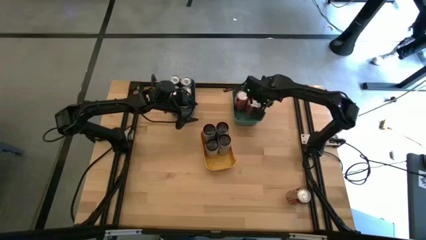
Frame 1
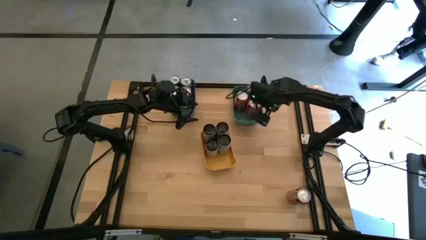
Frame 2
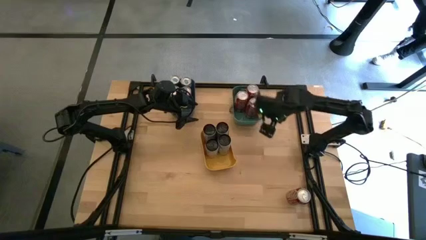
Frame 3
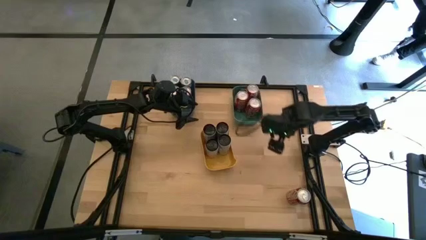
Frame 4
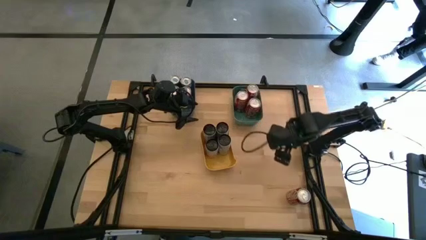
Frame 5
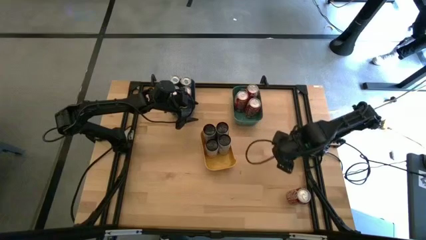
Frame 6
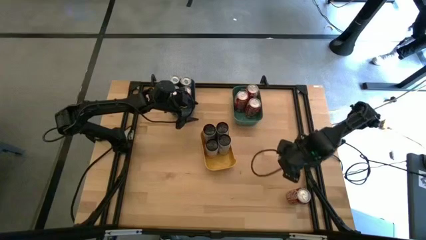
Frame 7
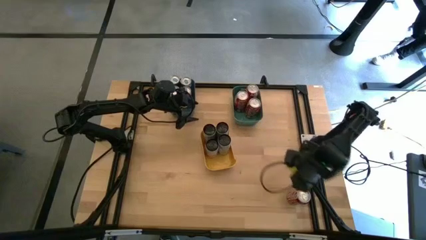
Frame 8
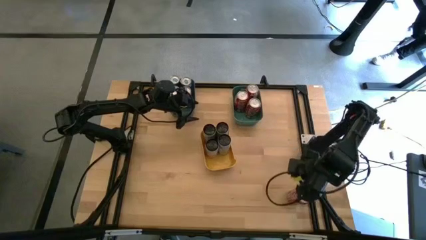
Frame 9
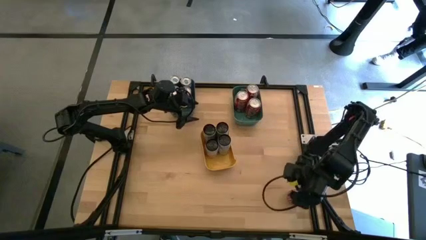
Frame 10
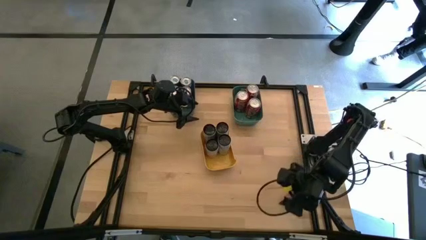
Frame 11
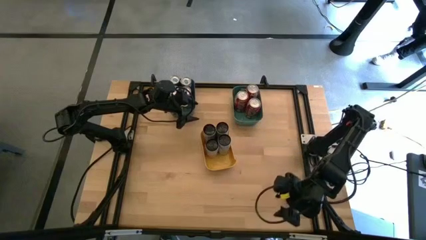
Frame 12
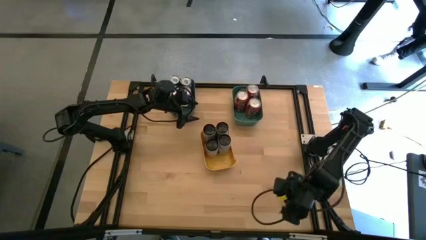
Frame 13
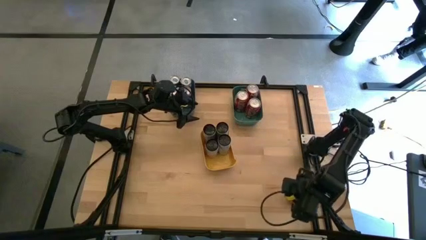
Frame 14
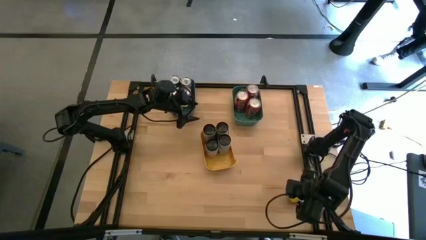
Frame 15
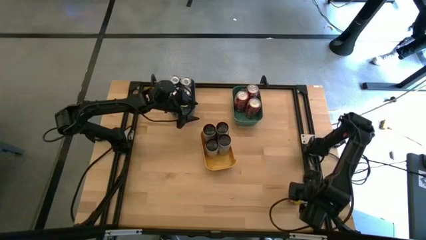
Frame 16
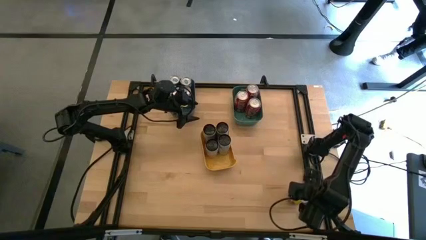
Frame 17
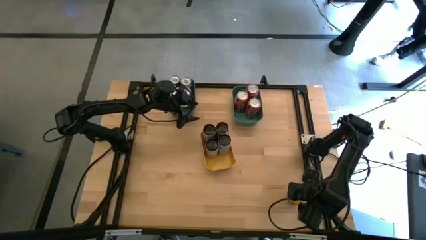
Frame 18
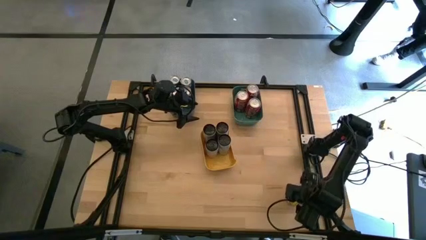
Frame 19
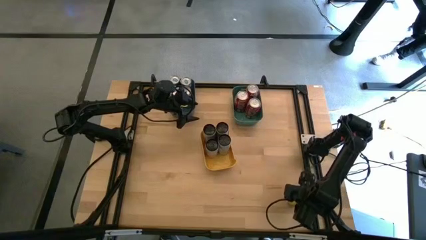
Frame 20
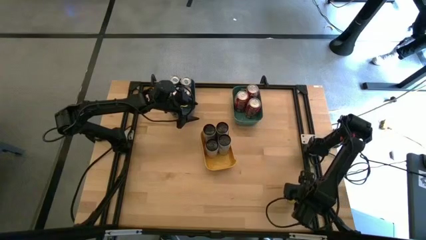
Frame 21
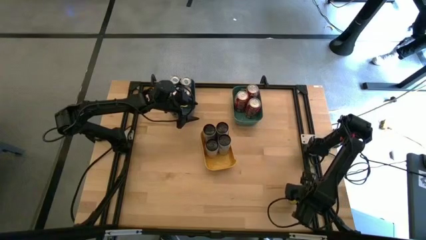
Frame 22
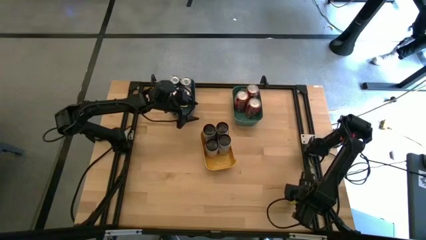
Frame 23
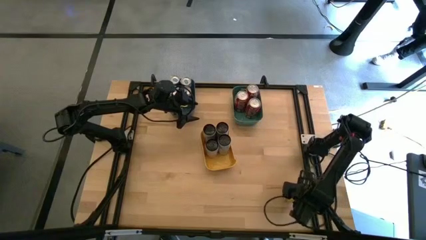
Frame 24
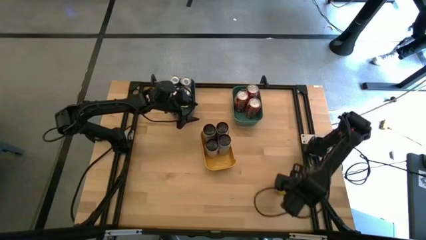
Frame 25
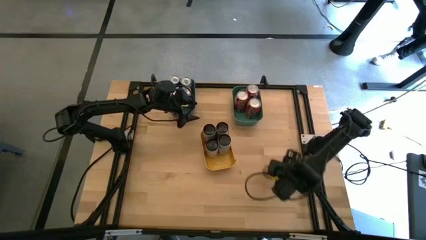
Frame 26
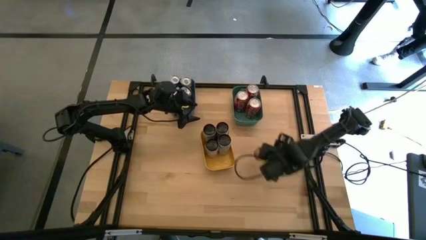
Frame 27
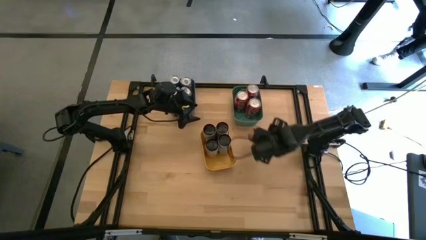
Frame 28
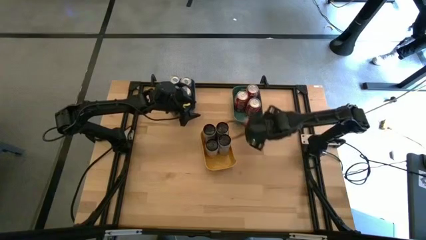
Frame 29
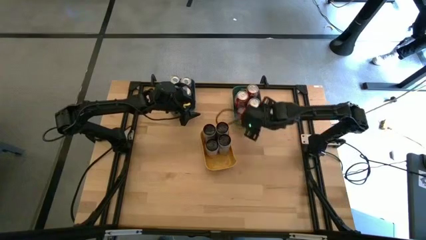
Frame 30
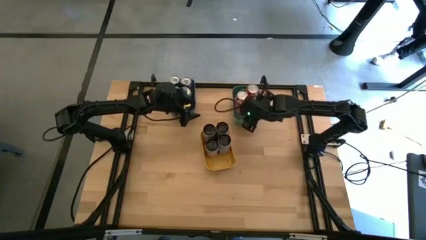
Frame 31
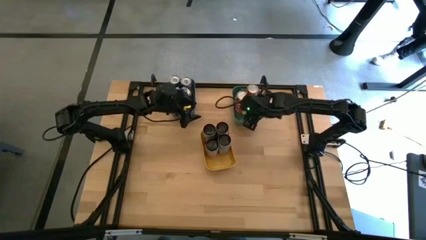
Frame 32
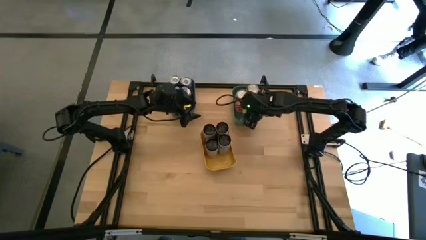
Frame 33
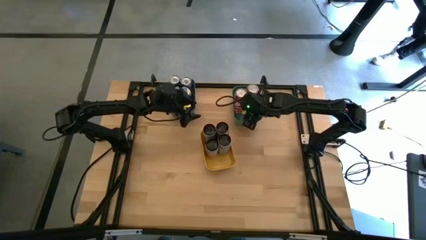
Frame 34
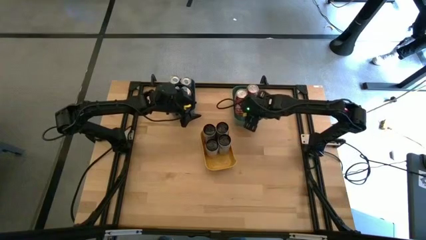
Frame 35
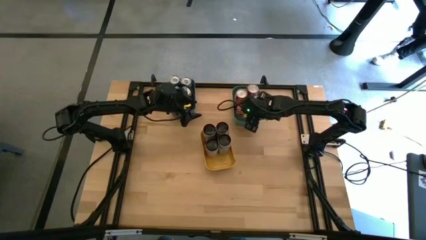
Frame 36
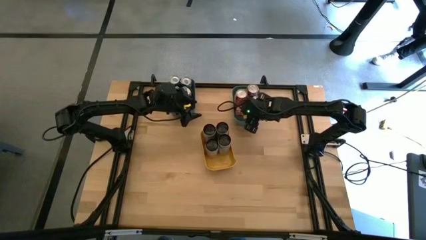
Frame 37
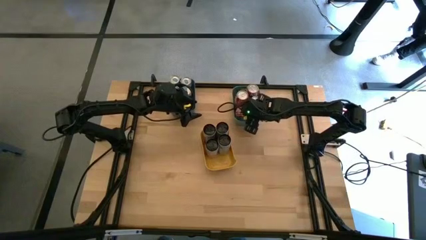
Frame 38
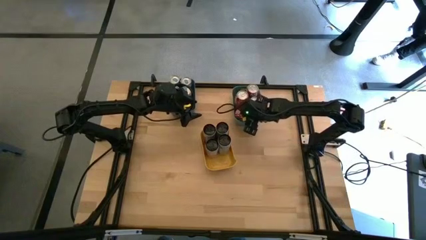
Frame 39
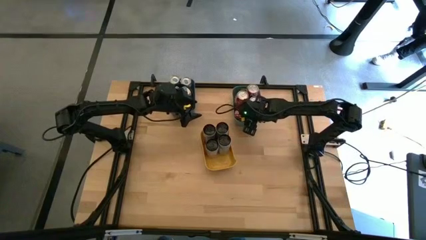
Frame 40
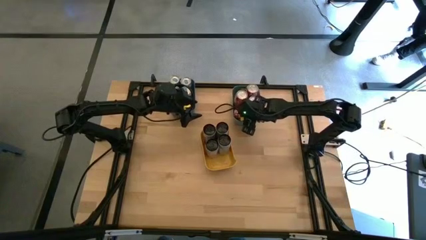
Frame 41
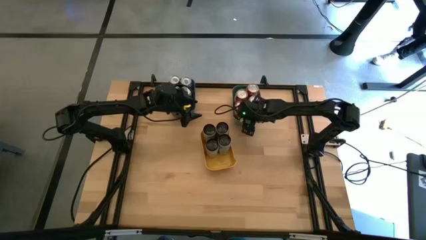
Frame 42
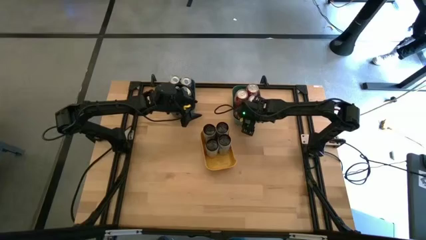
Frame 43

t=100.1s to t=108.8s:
Task: Sort soda cans
Put the red soda can into the green bin

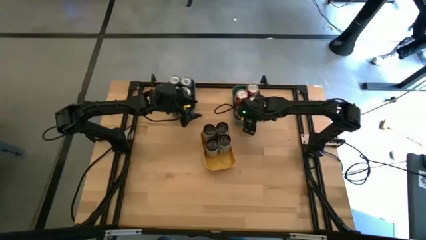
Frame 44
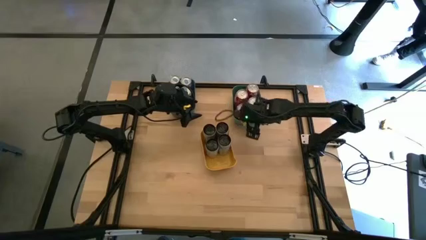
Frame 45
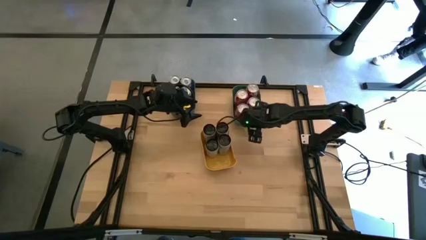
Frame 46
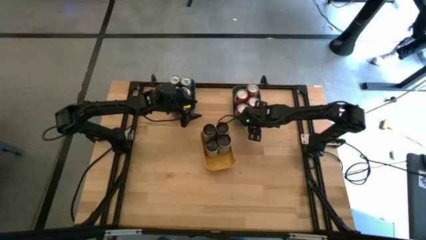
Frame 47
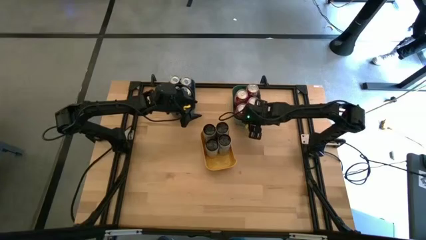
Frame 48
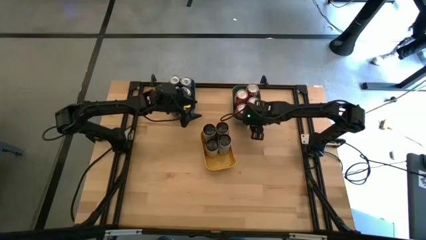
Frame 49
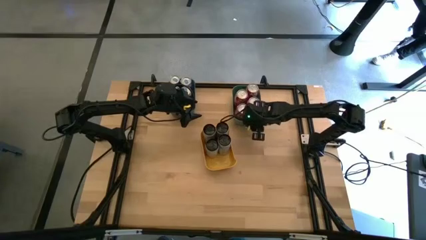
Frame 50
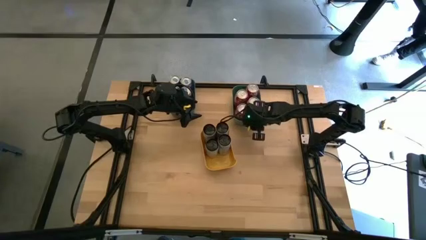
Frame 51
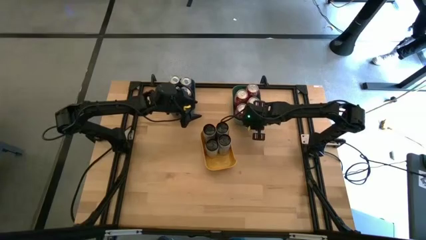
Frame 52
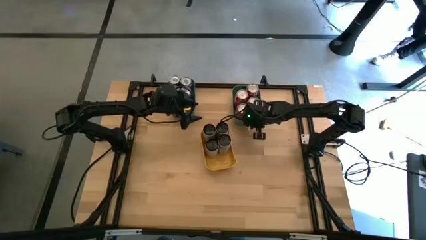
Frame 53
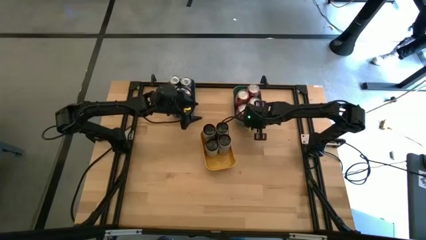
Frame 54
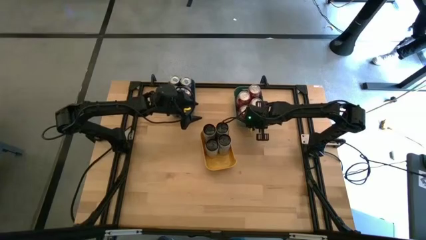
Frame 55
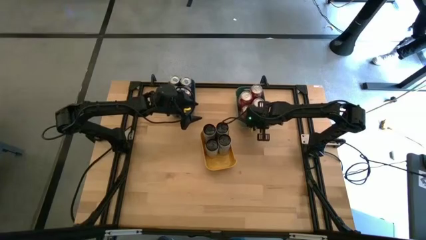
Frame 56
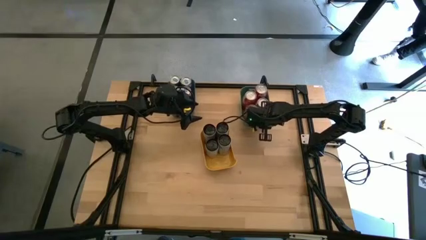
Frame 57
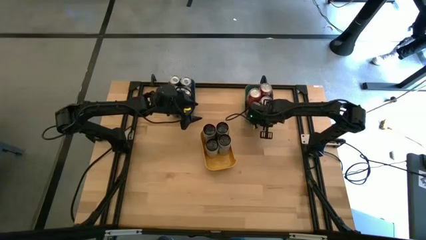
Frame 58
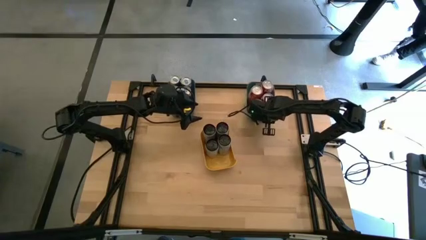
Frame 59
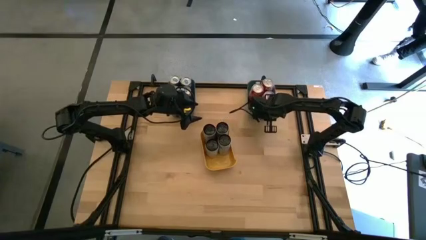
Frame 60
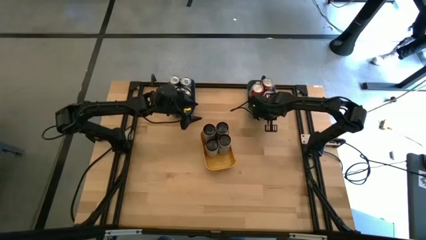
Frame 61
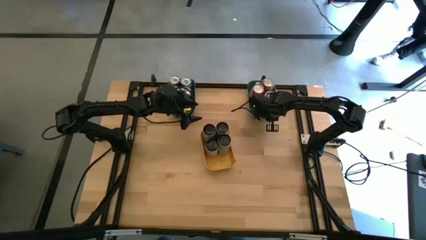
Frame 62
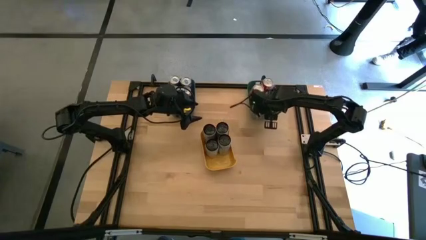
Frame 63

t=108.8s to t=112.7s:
Adjust the green bin

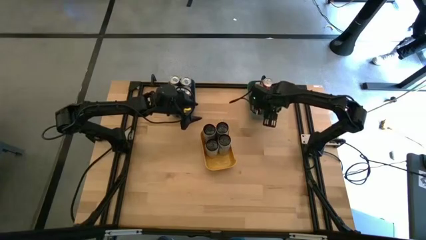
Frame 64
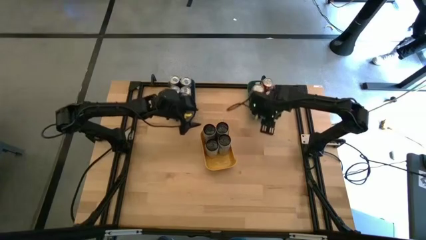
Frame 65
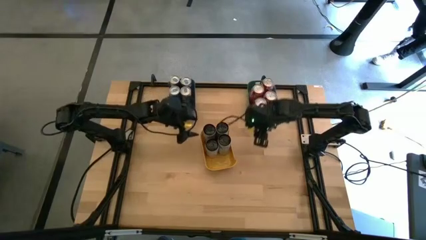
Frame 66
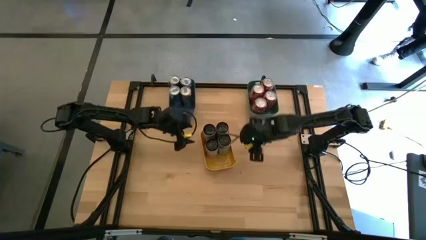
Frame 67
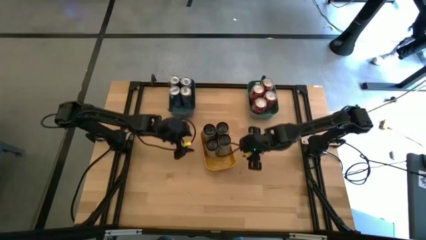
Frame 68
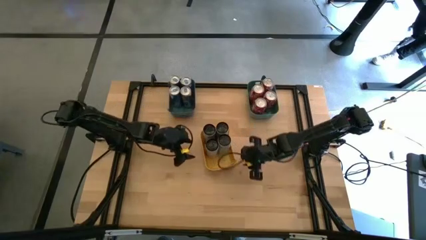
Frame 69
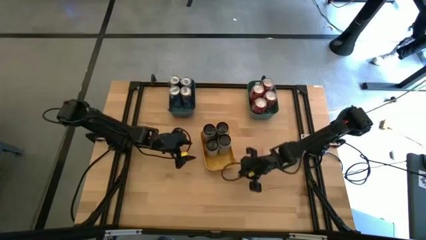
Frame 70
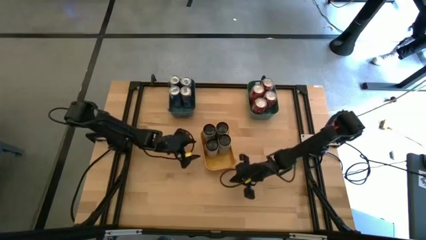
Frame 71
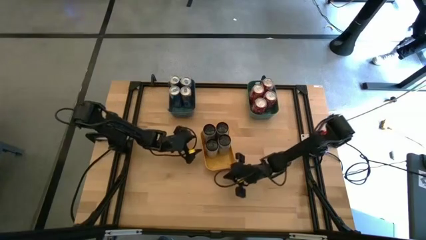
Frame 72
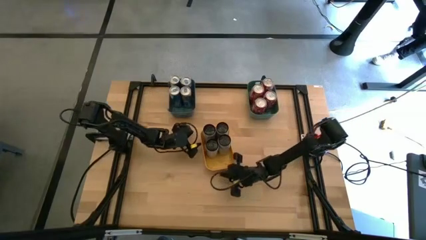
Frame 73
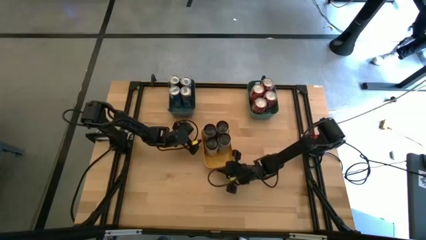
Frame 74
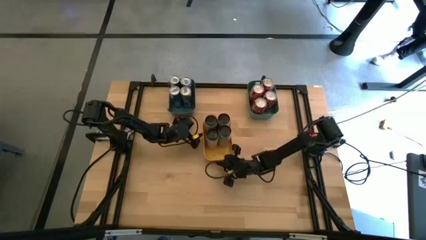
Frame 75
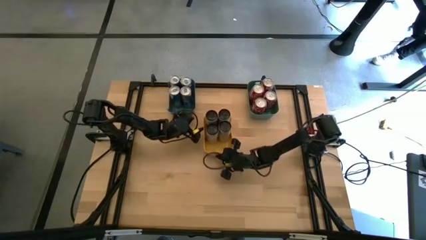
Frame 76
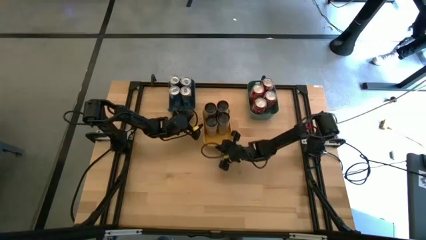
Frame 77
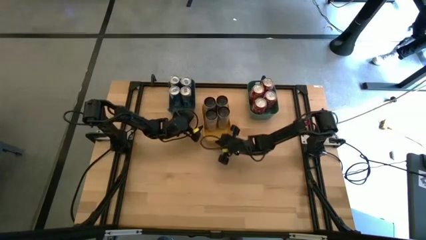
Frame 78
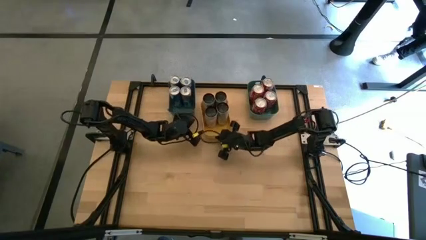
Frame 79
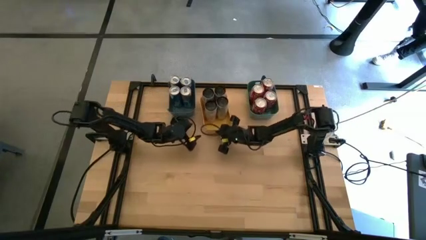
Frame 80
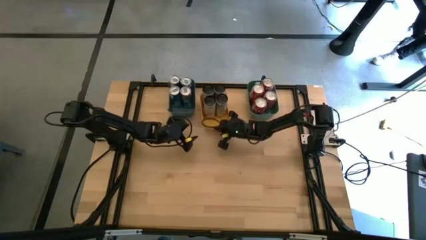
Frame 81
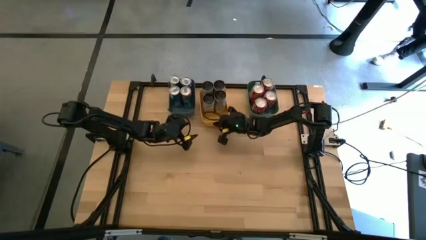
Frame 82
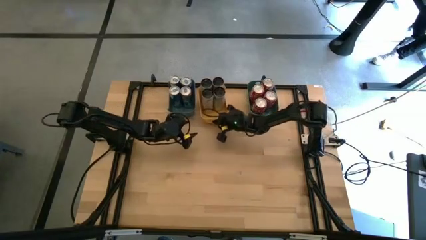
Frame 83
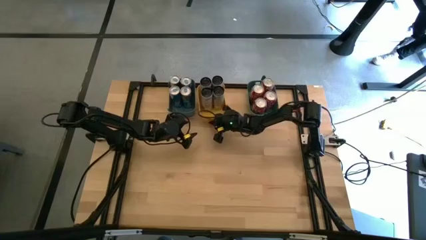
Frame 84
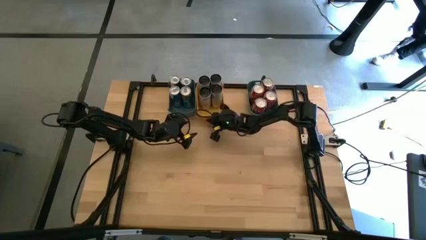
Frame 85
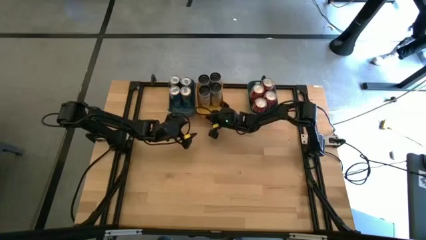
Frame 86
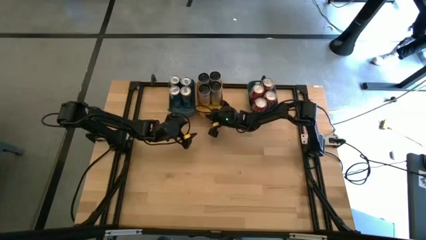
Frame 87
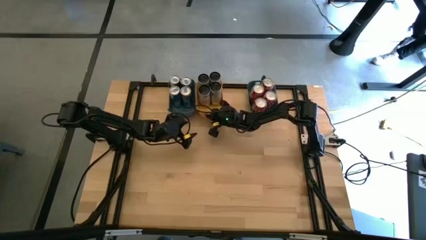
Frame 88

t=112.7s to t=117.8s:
Adjust the yellow bin
